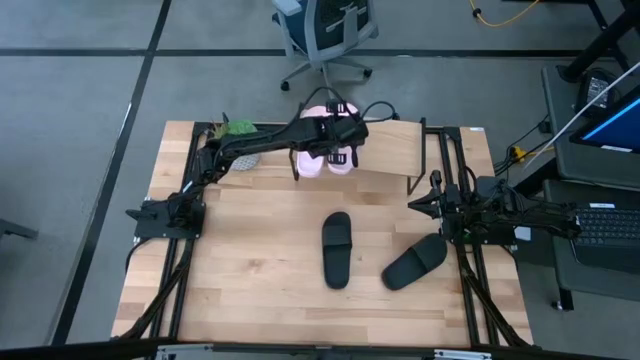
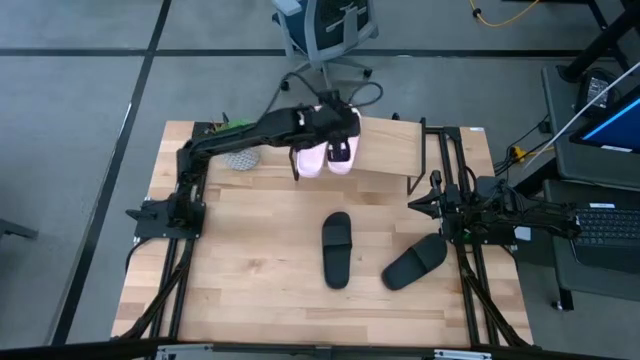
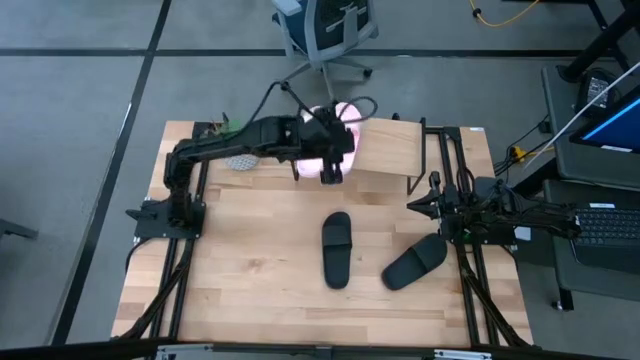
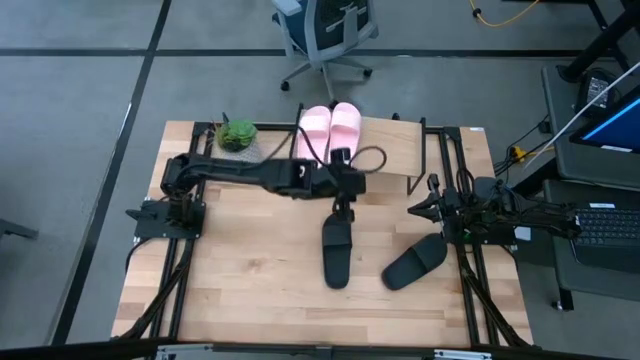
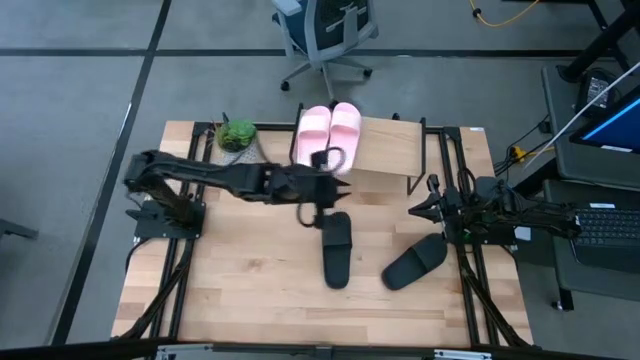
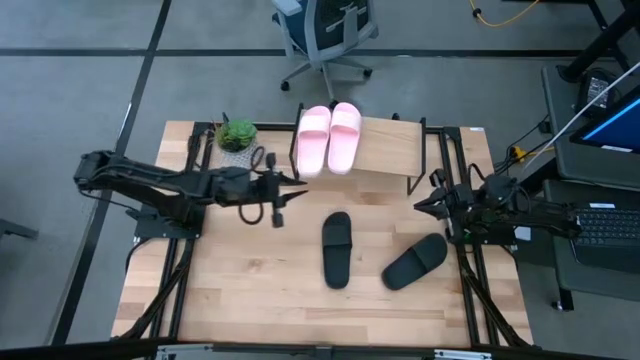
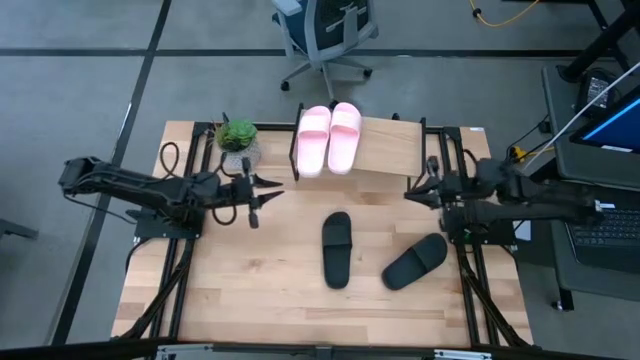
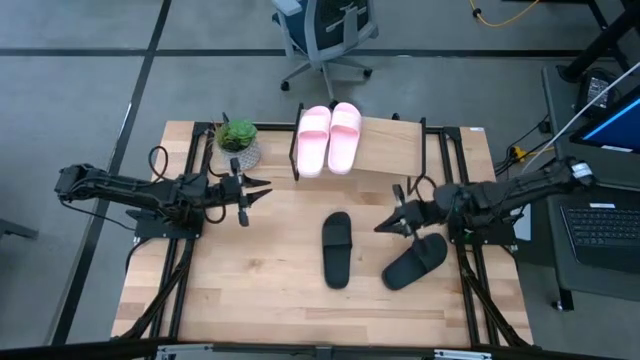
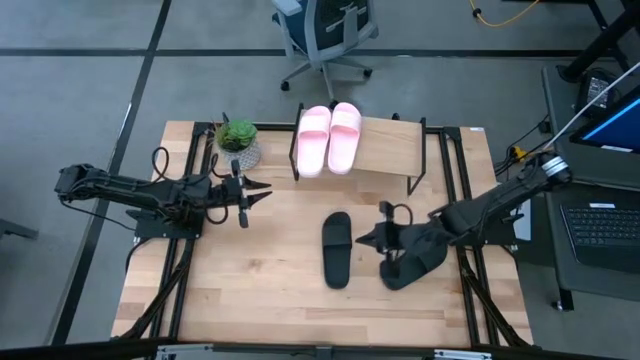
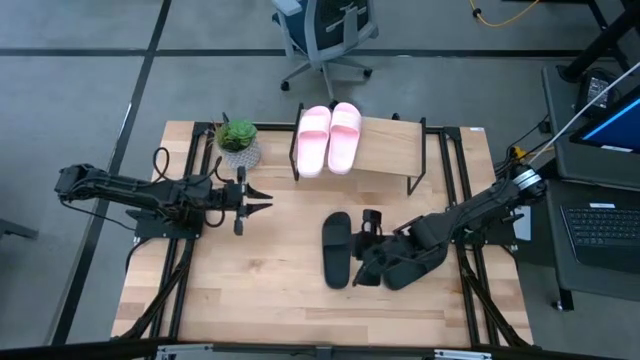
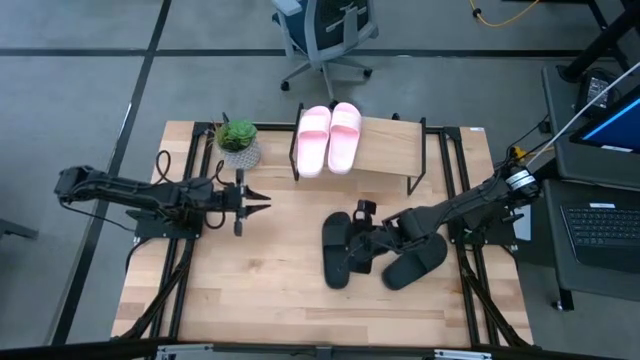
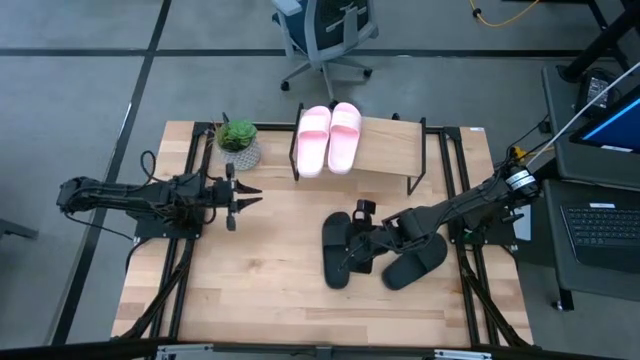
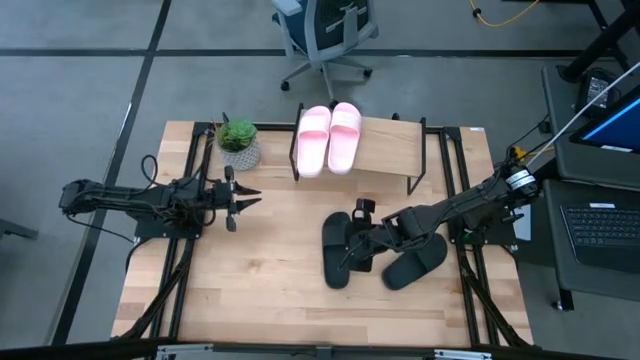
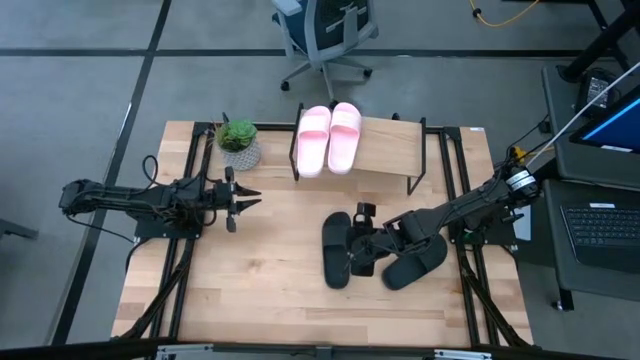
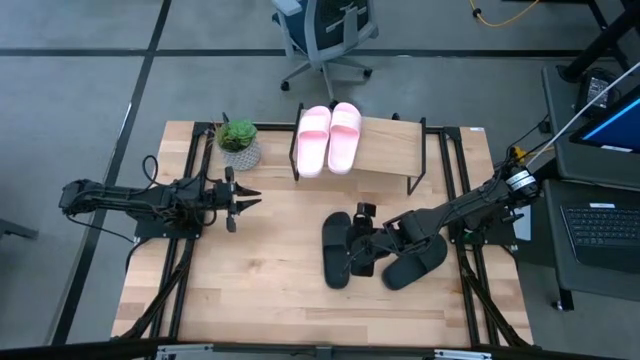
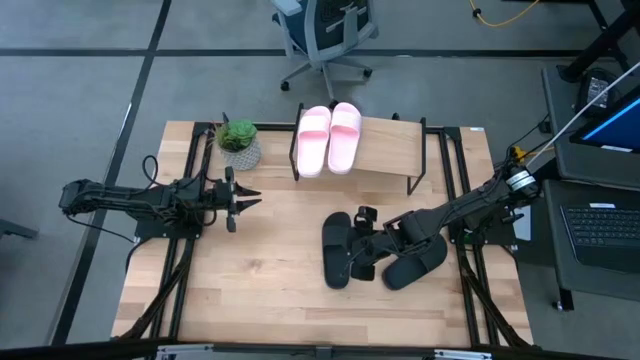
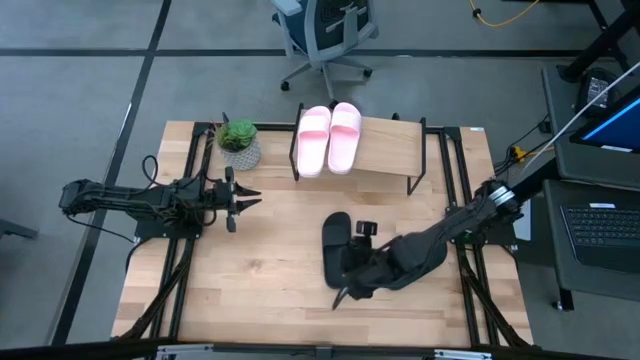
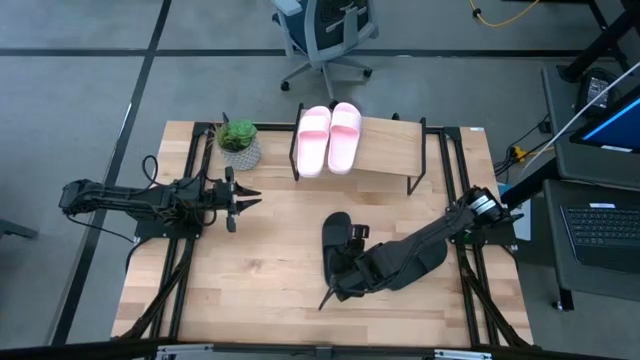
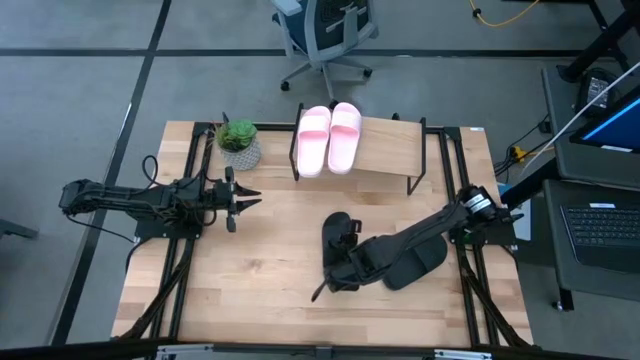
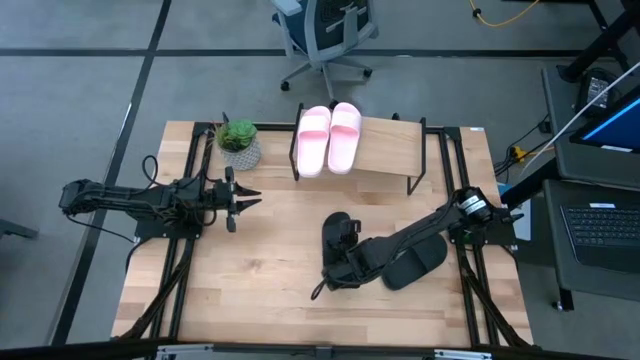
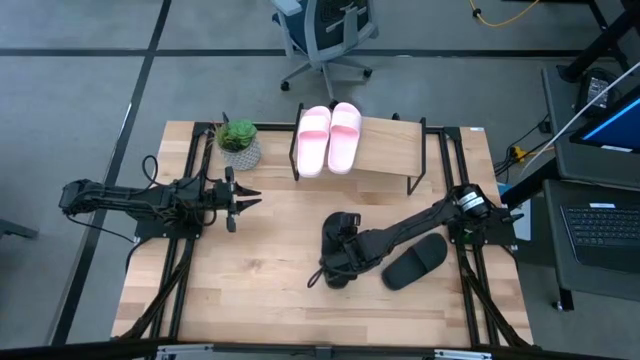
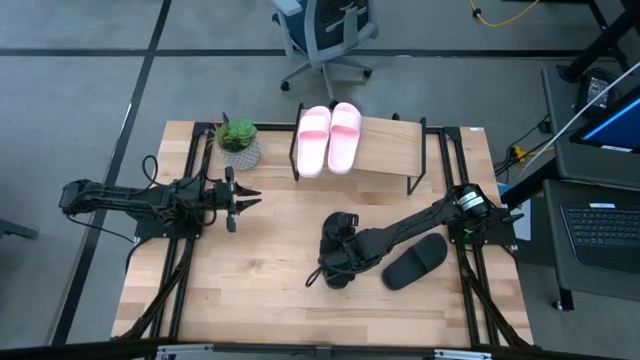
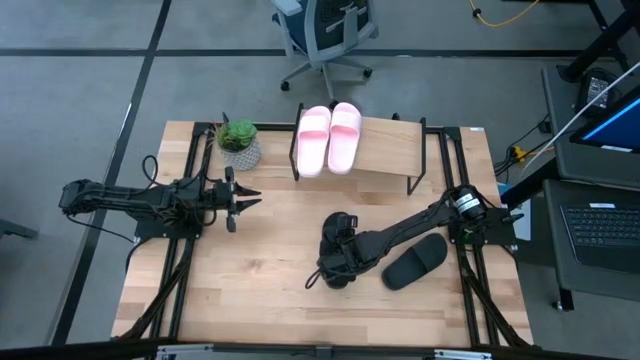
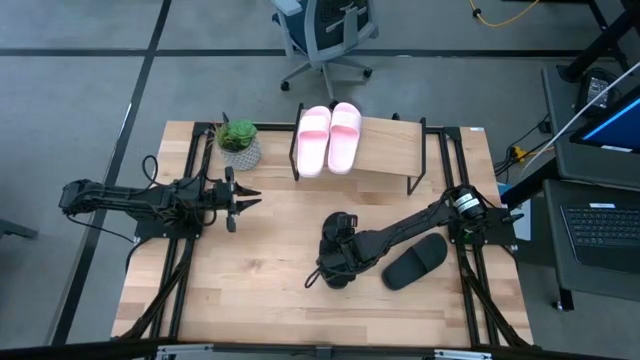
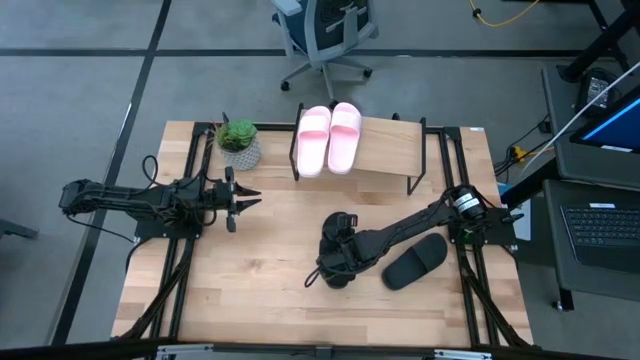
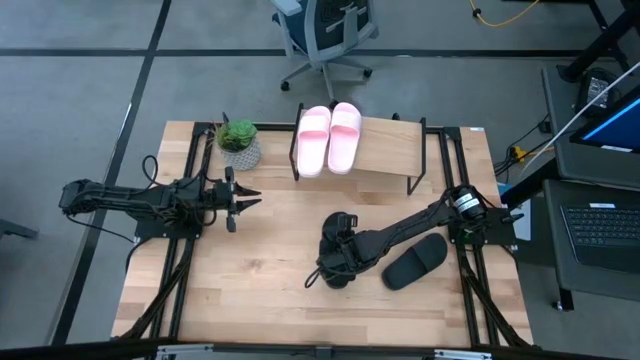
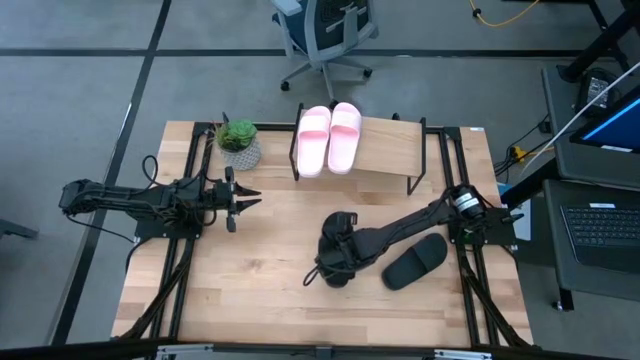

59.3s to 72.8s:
Task: Pick and place slides into the shelf
Put the left black slide on the shelf

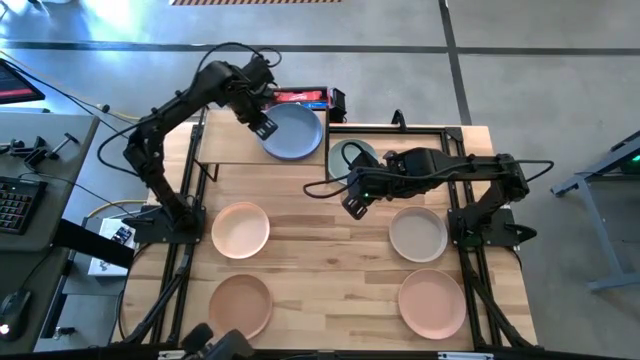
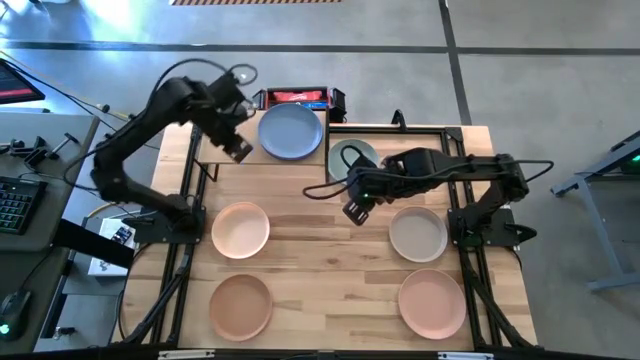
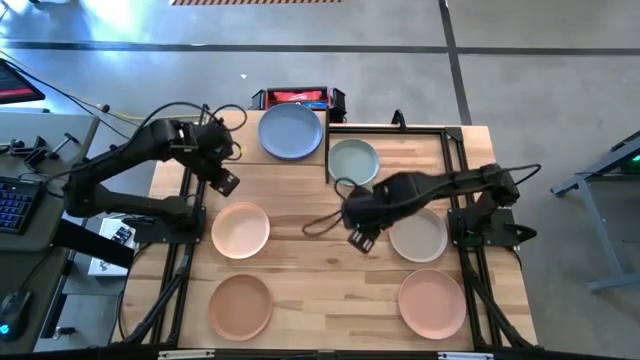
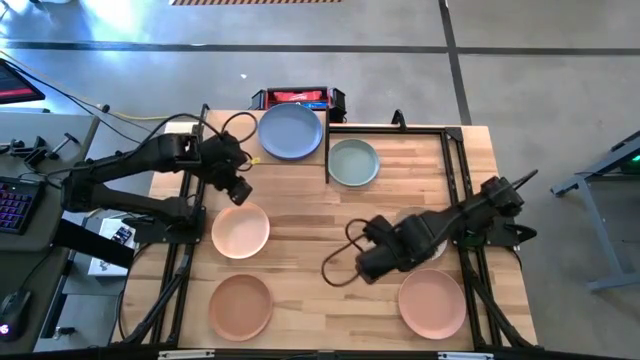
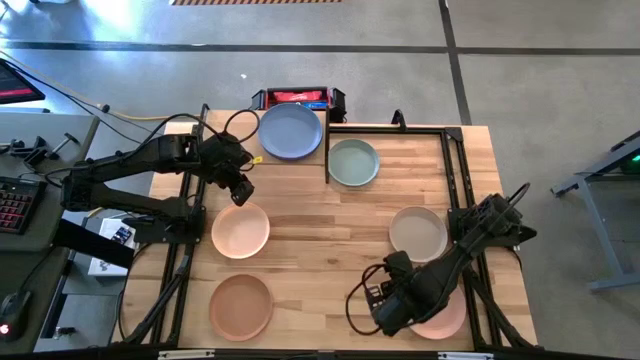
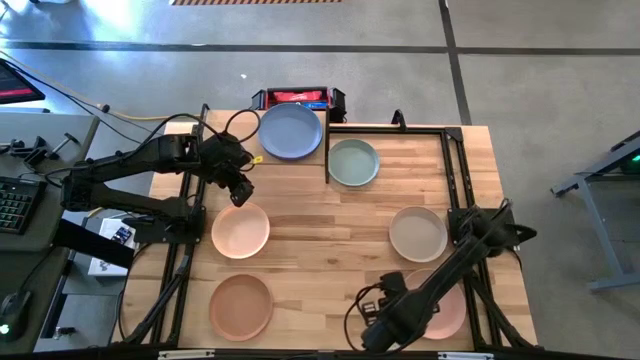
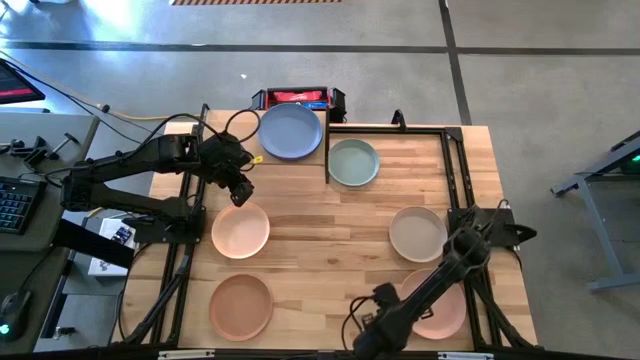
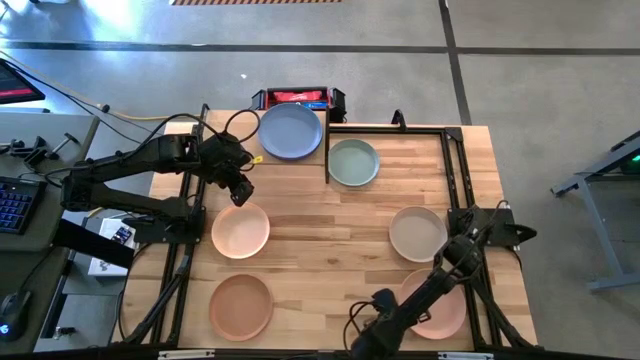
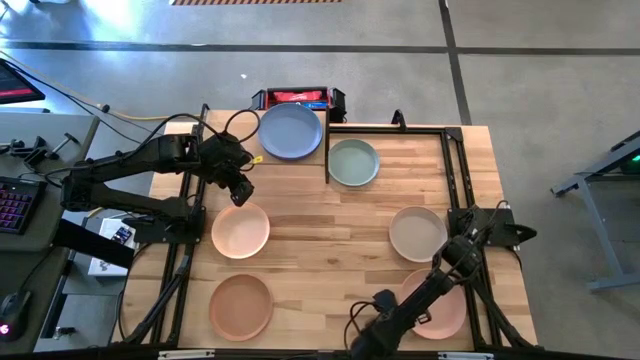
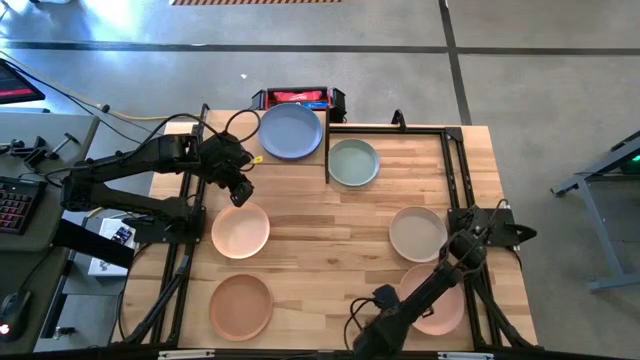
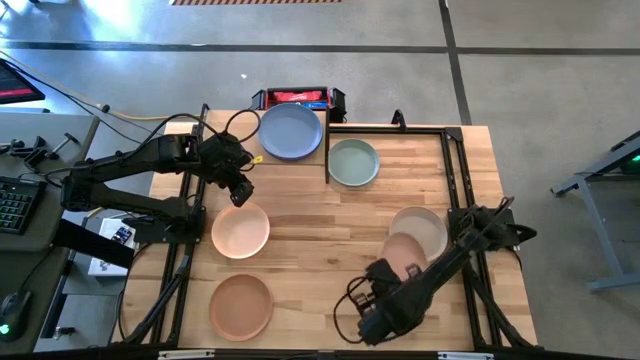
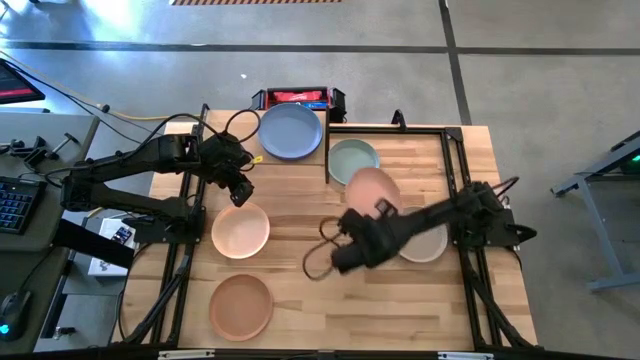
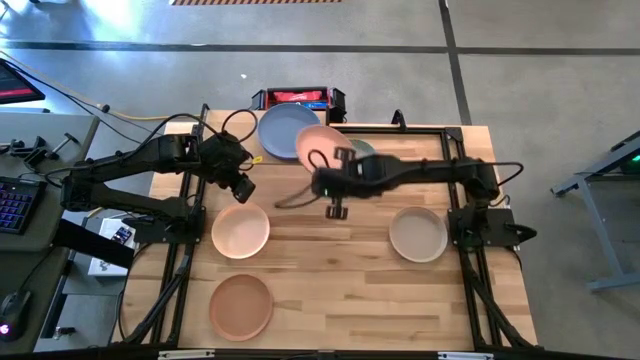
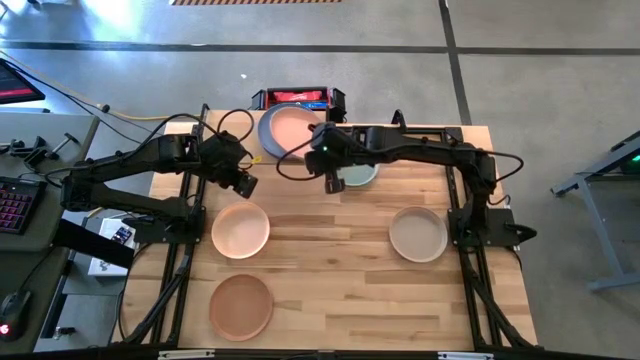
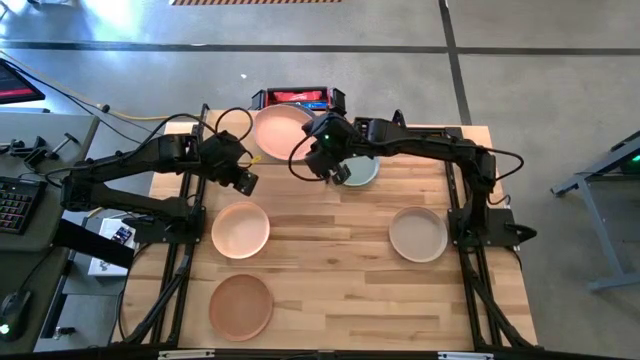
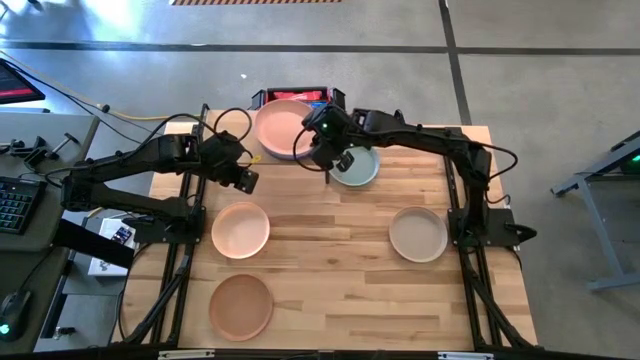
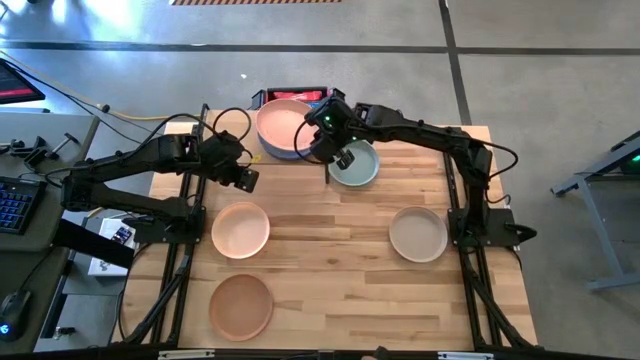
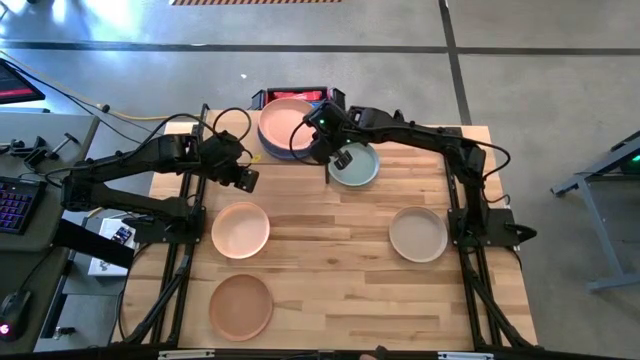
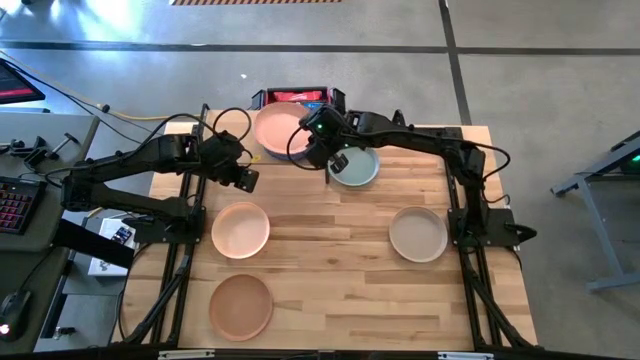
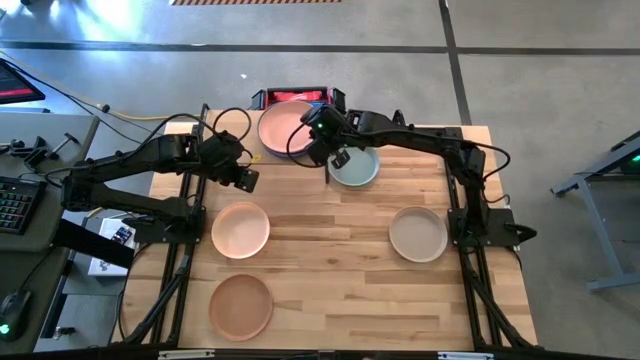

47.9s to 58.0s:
Task: Place and stack plates onto a shelf
Stack the light orange plate on top of the blue plate on the shelf
